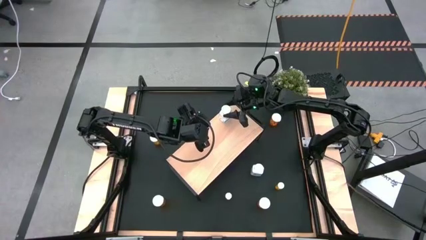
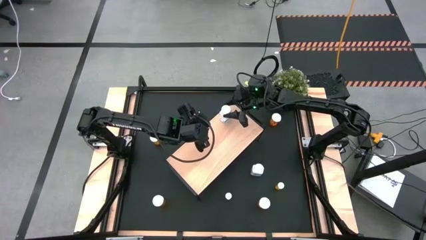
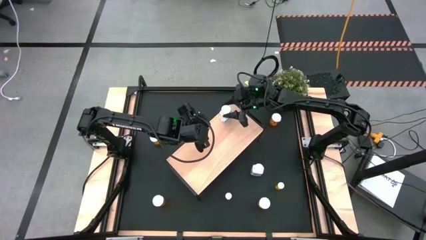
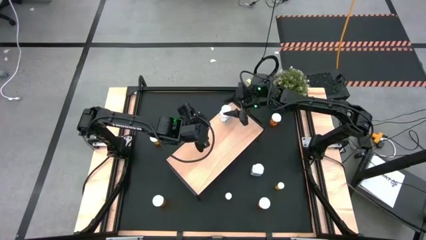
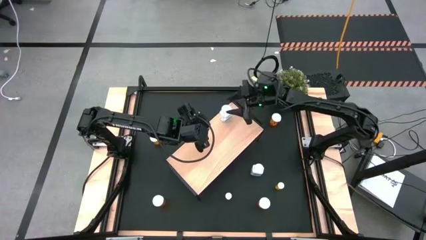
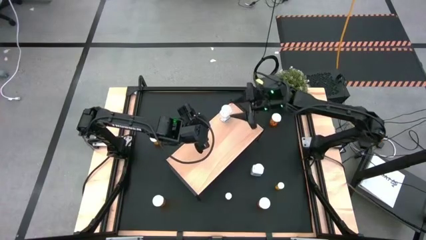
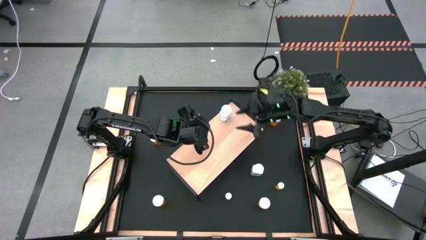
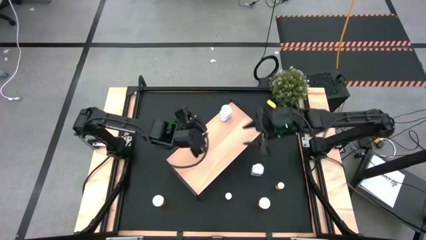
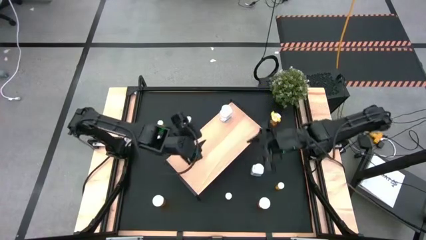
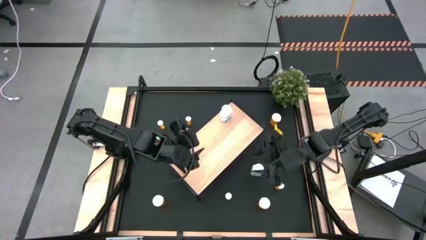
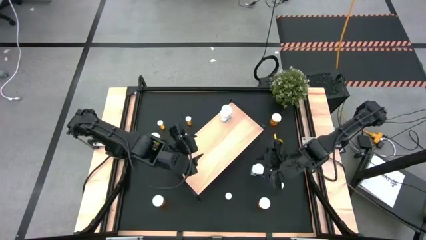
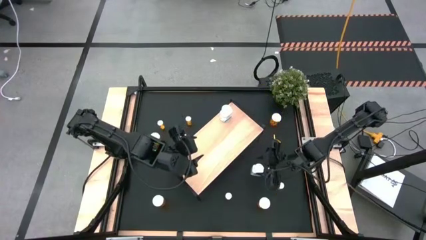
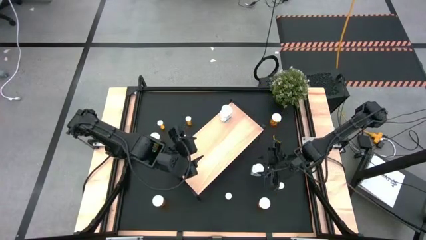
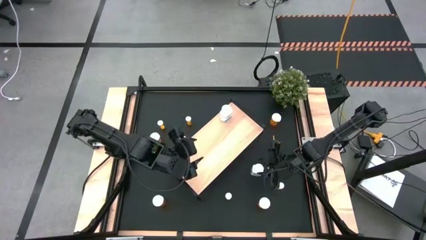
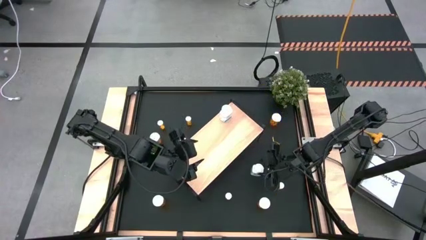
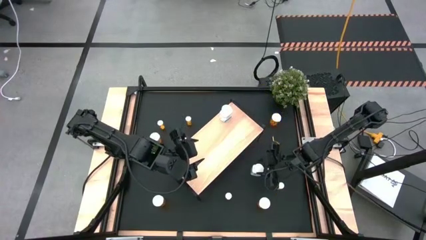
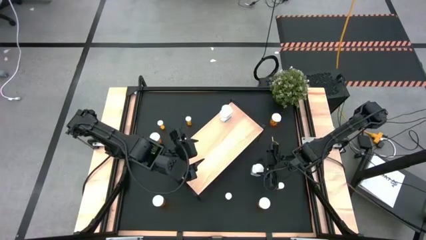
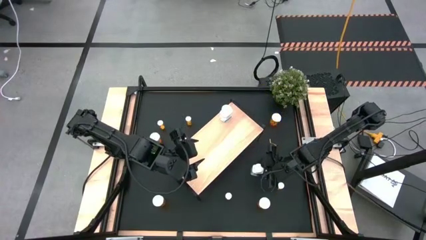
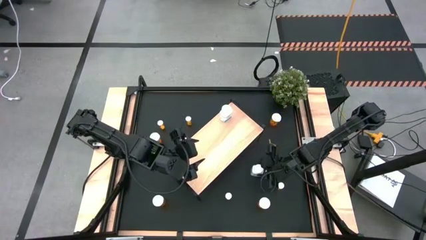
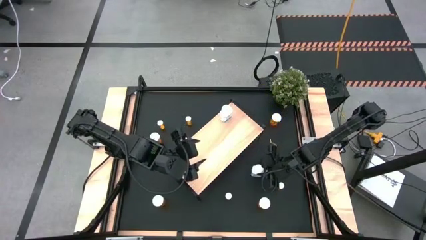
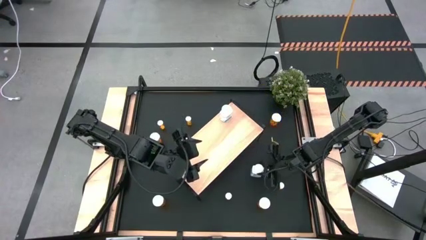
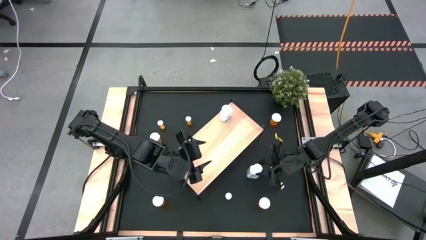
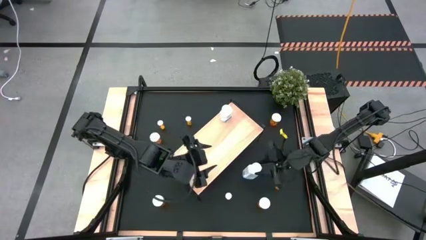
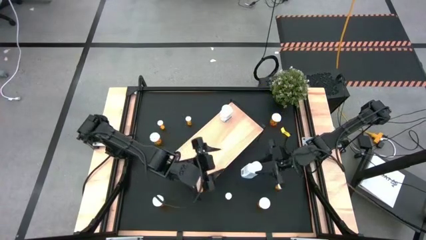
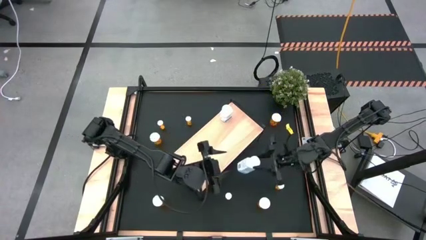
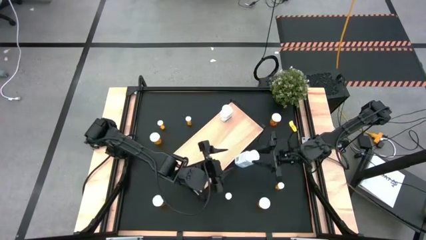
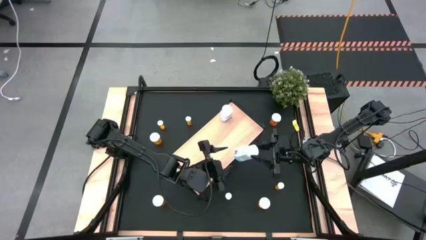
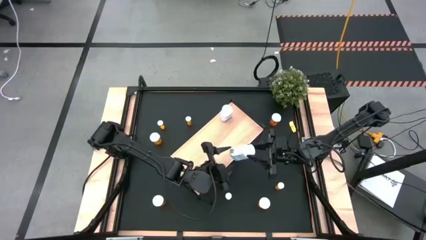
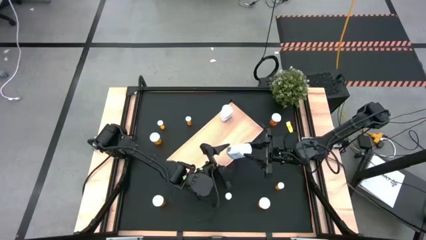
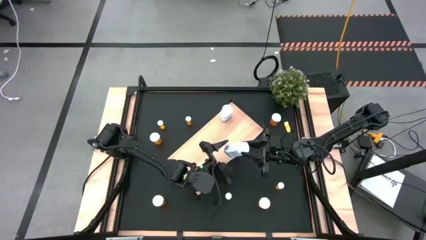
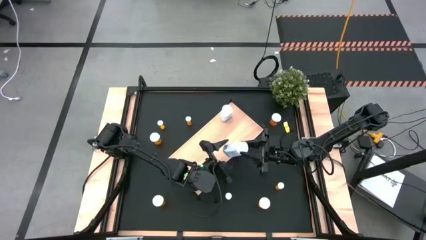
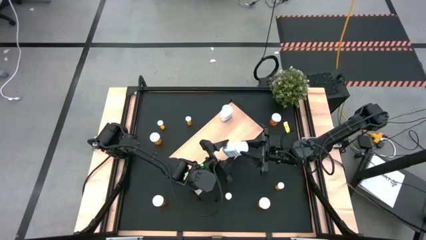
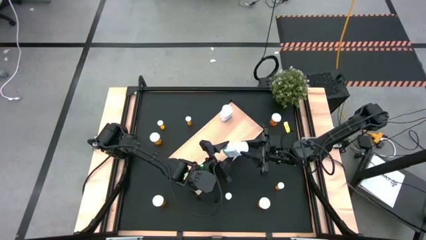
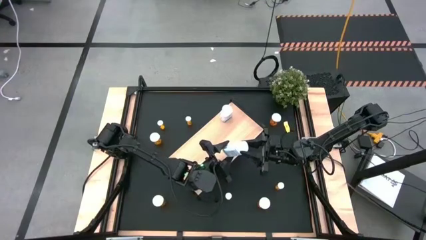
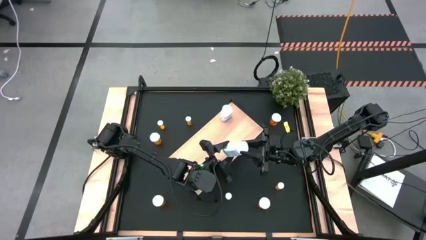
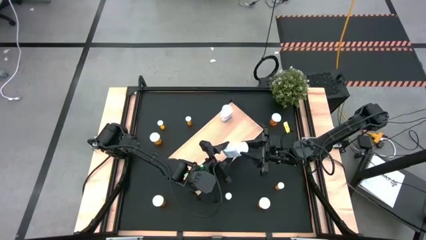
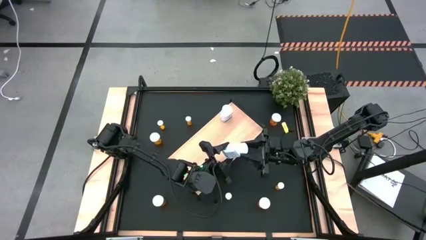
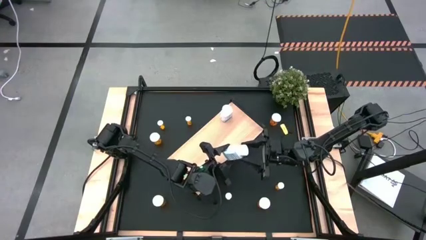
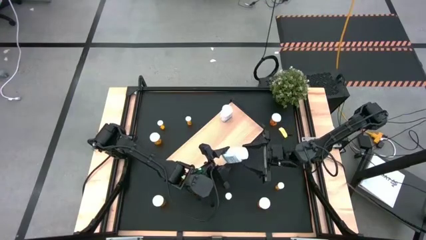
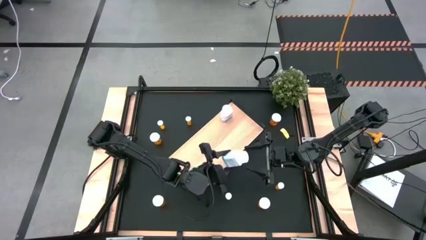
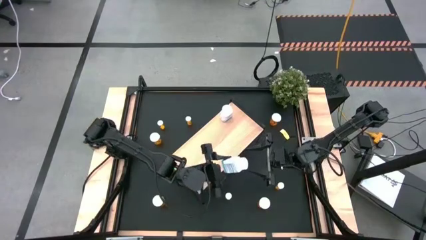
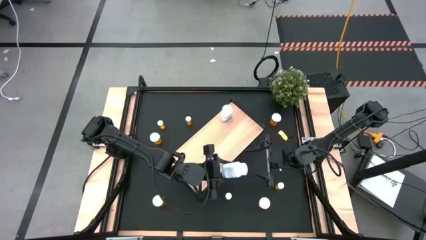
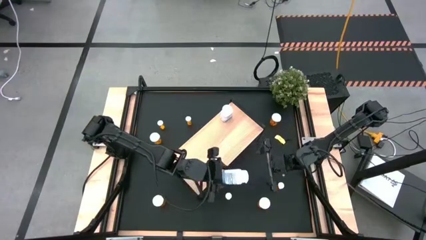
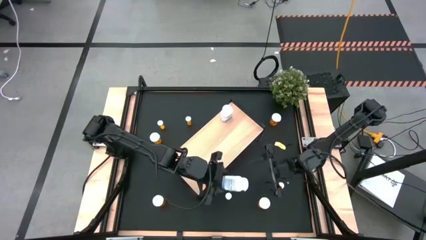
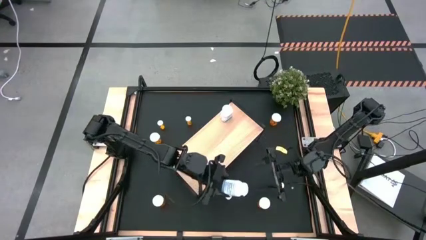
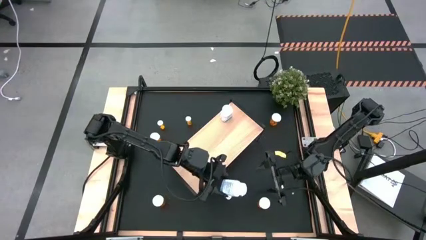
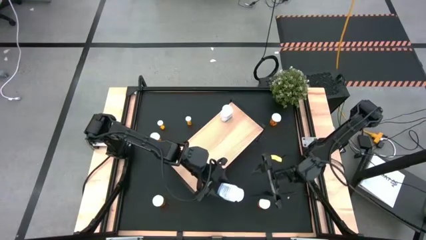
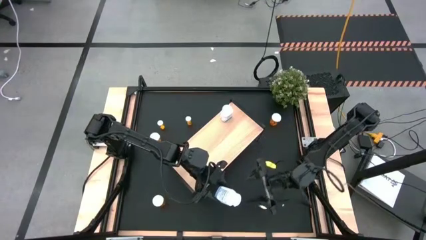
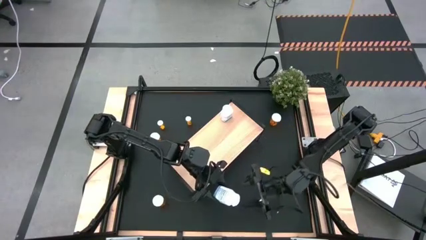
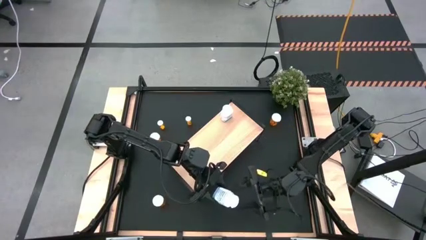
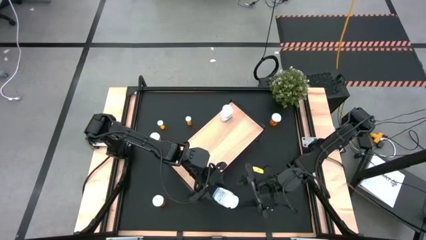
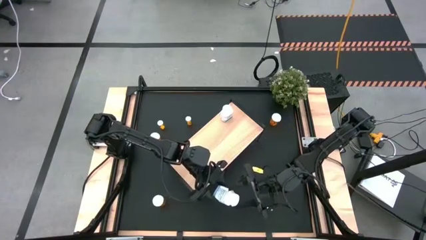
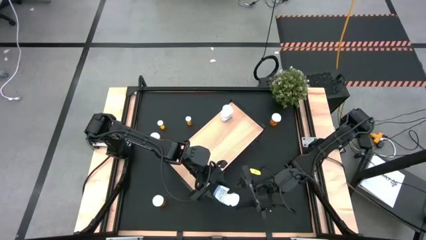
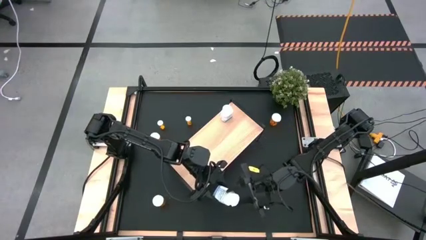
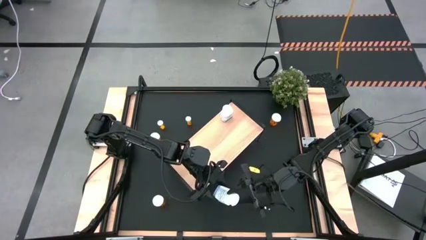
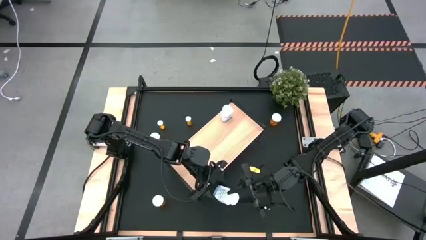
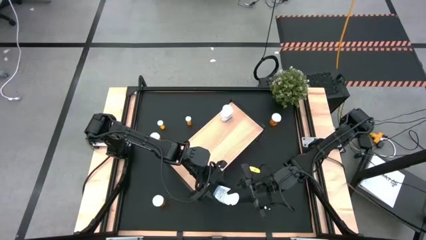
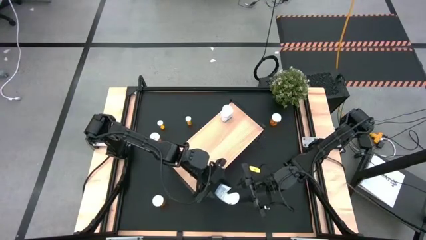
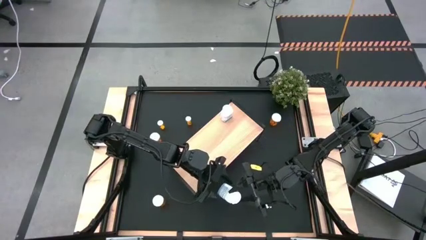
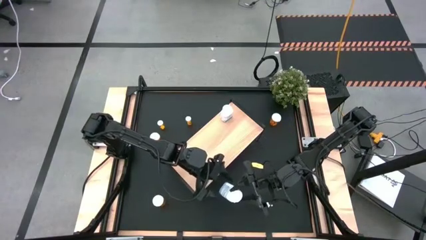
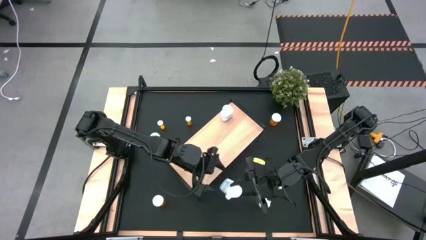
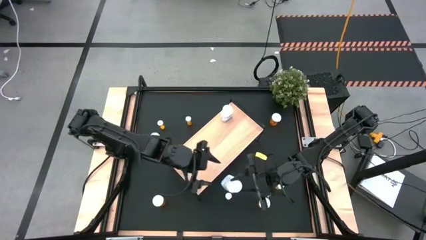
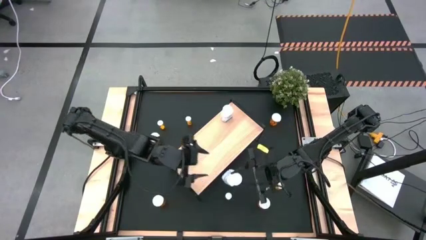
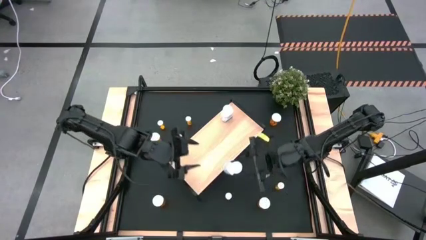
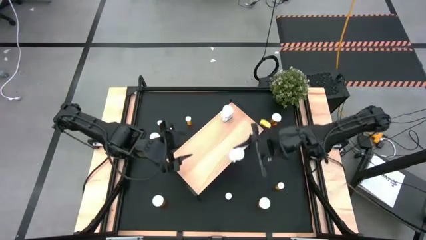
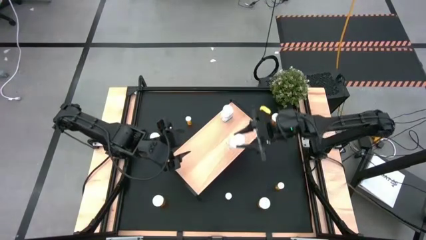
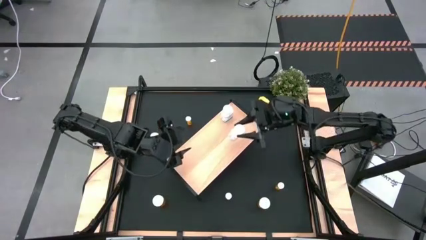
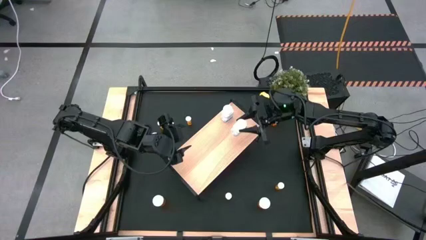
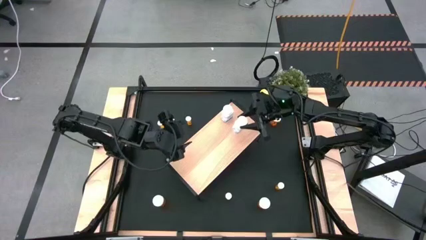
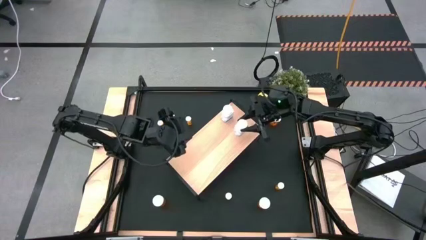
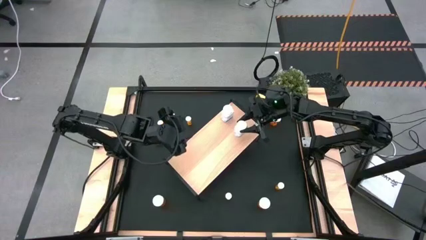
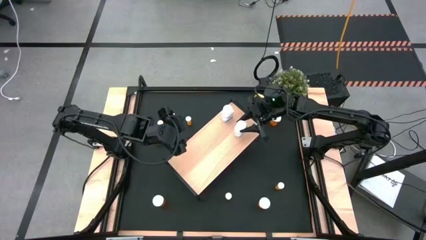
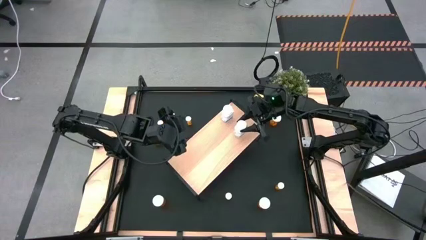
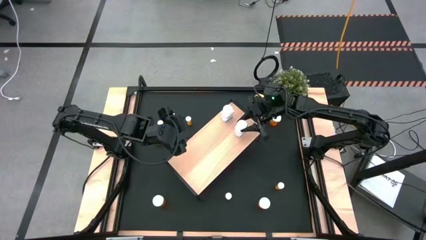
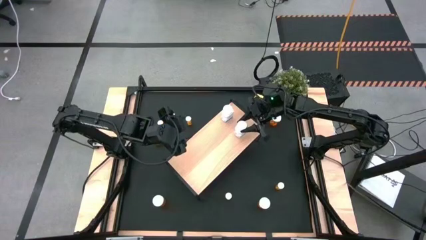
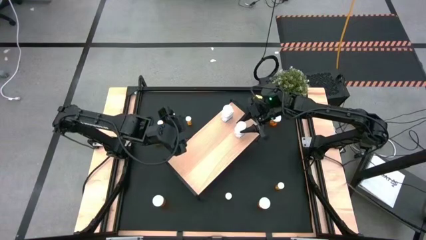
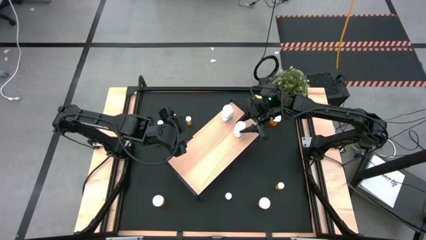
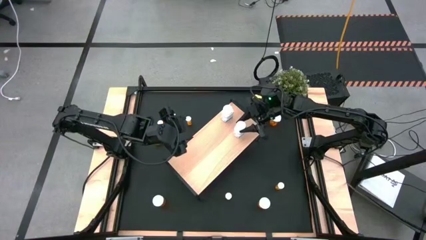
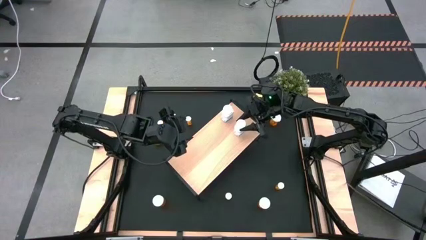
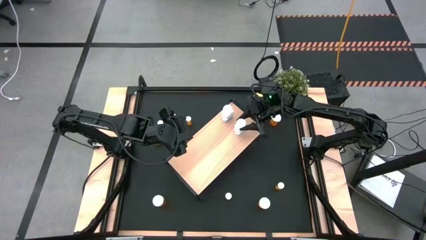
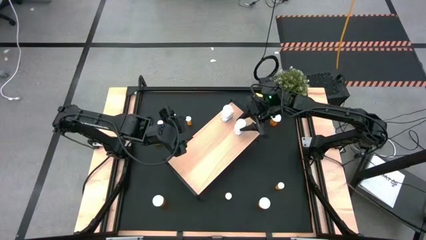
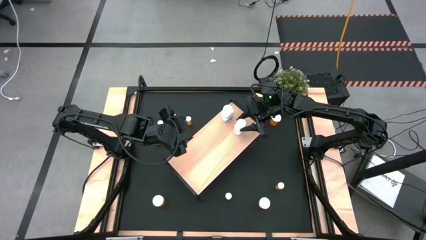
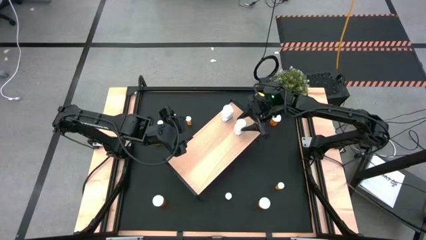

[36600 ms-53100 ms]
Task: Pick and place medicine bottles onto shelf by color
Put the white pill bottle on the shelf
